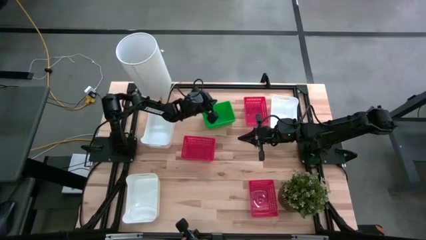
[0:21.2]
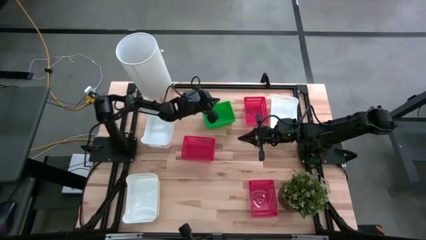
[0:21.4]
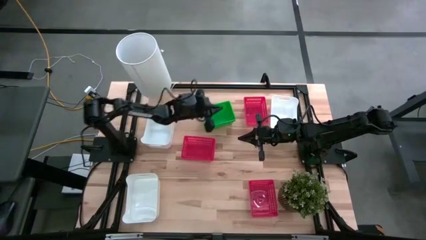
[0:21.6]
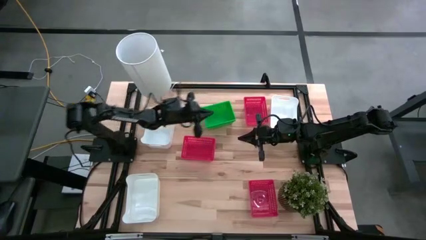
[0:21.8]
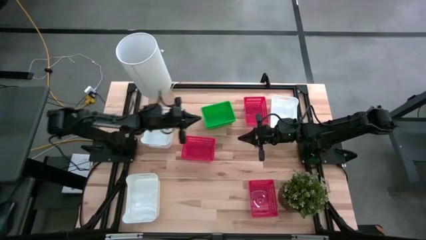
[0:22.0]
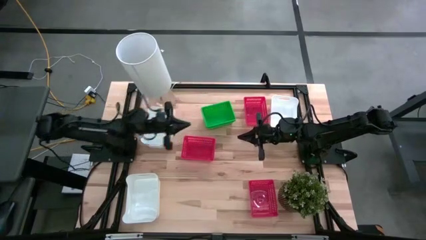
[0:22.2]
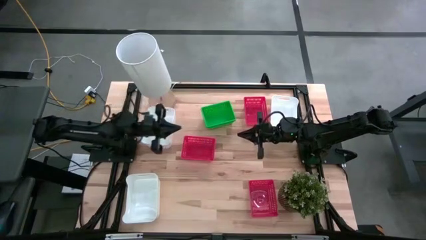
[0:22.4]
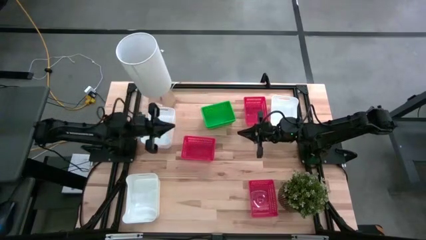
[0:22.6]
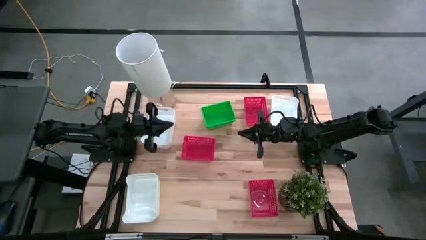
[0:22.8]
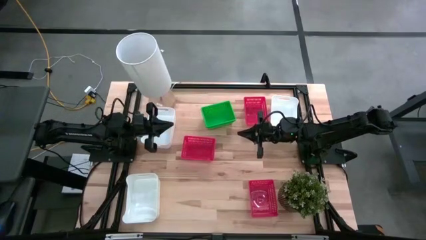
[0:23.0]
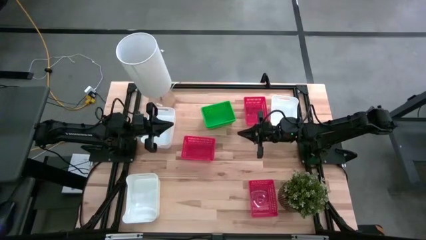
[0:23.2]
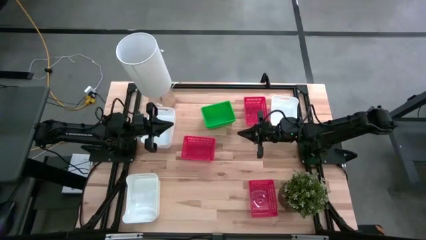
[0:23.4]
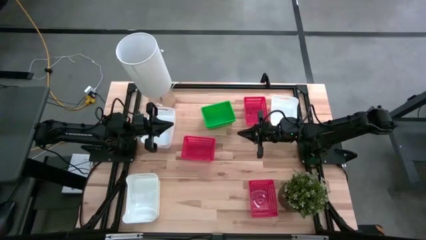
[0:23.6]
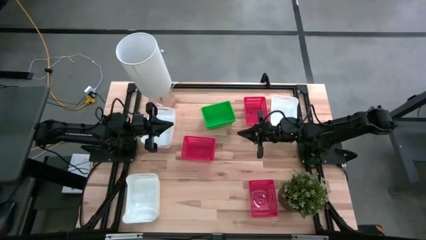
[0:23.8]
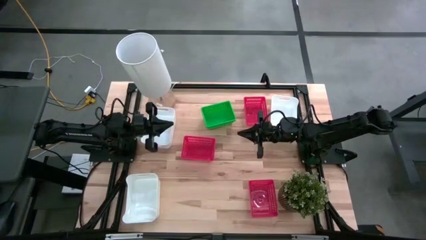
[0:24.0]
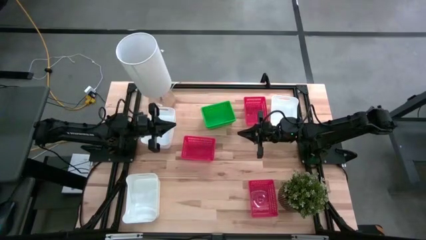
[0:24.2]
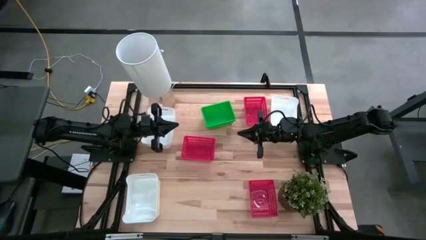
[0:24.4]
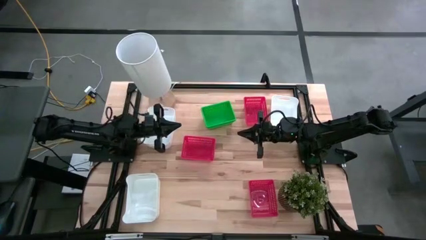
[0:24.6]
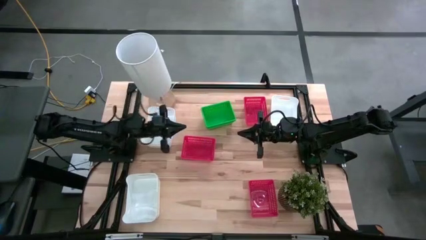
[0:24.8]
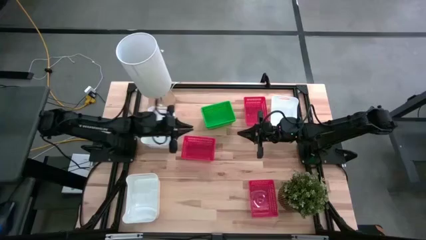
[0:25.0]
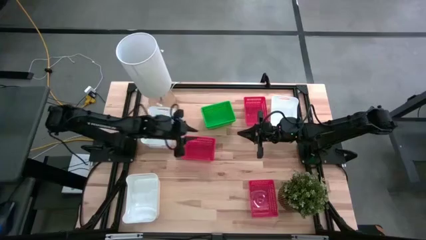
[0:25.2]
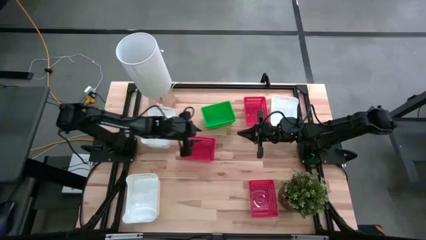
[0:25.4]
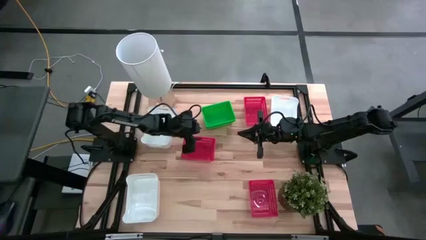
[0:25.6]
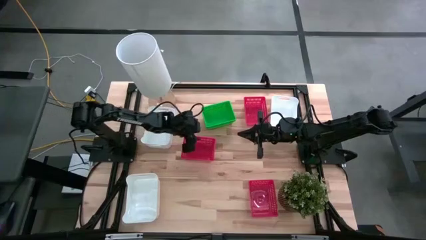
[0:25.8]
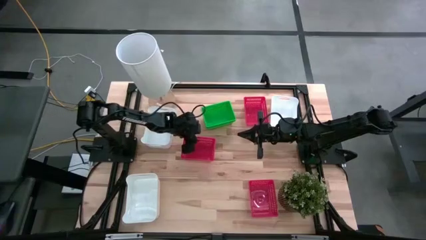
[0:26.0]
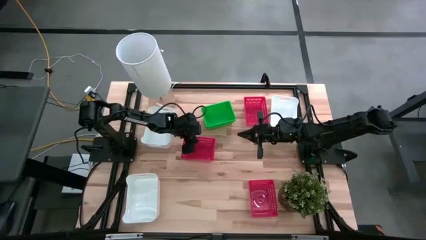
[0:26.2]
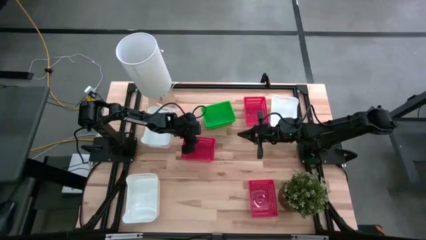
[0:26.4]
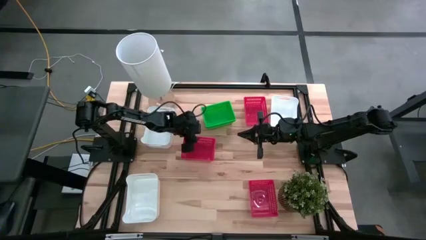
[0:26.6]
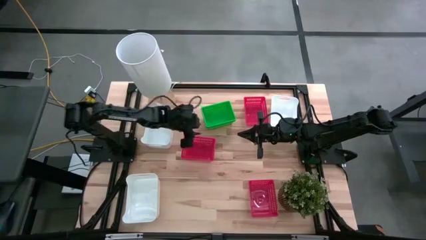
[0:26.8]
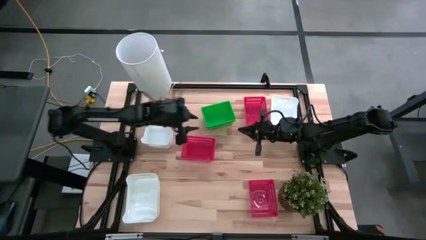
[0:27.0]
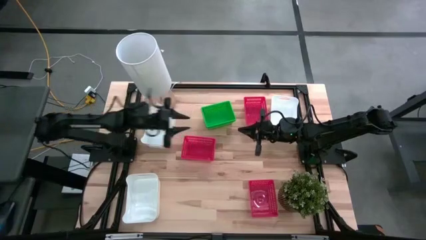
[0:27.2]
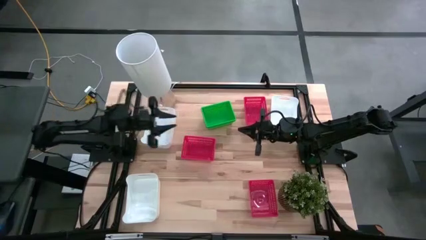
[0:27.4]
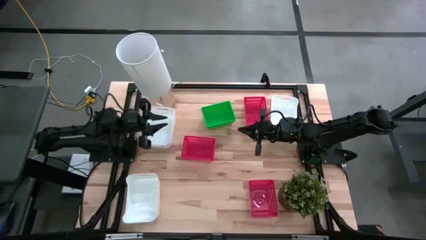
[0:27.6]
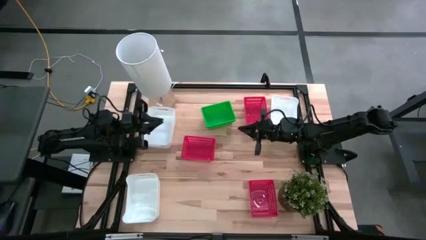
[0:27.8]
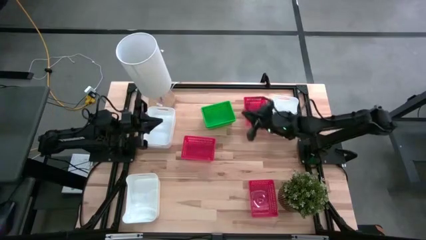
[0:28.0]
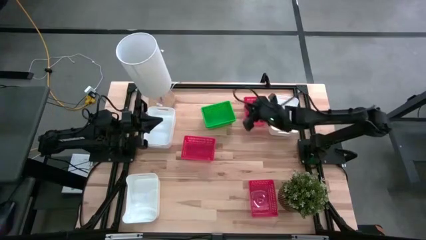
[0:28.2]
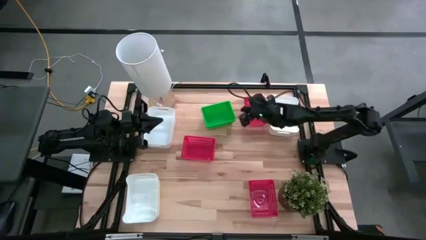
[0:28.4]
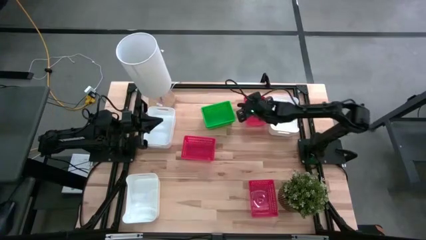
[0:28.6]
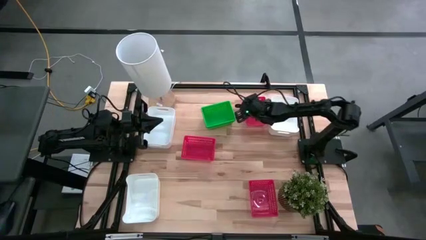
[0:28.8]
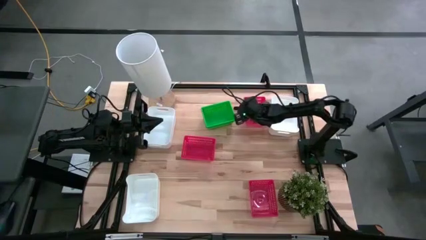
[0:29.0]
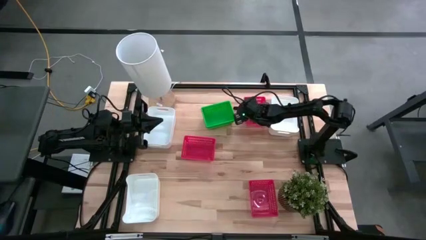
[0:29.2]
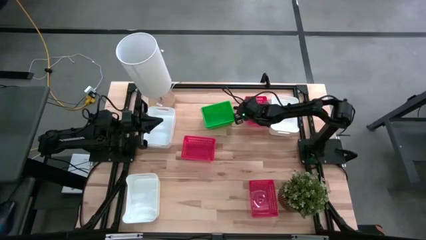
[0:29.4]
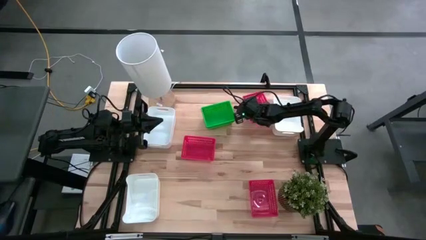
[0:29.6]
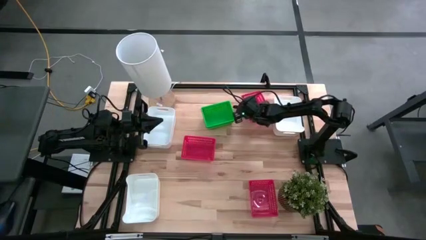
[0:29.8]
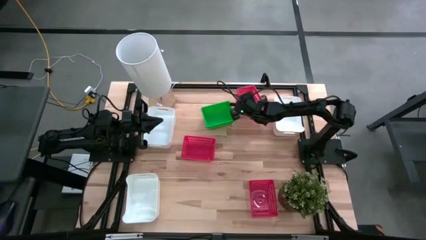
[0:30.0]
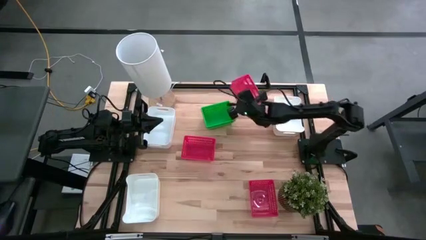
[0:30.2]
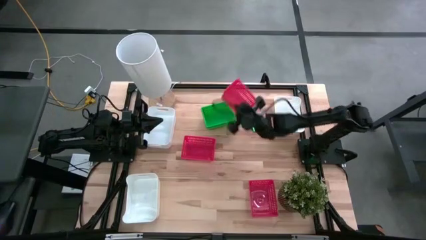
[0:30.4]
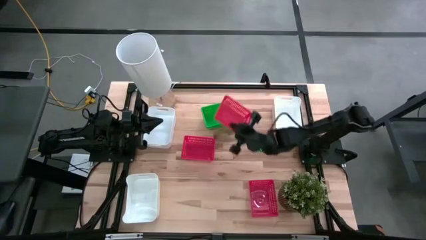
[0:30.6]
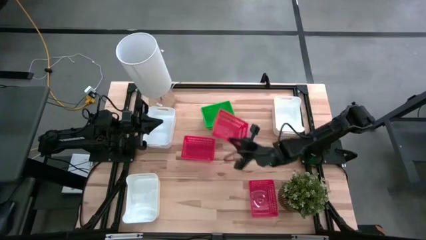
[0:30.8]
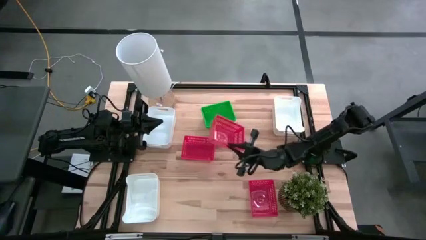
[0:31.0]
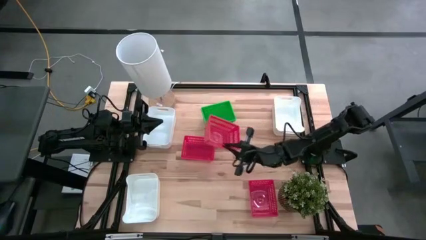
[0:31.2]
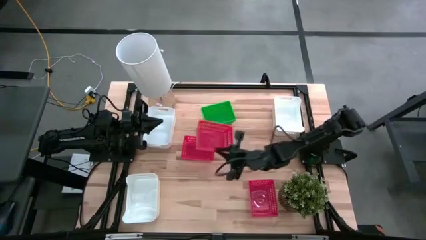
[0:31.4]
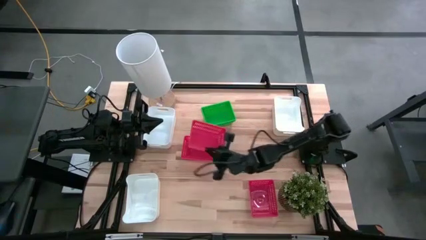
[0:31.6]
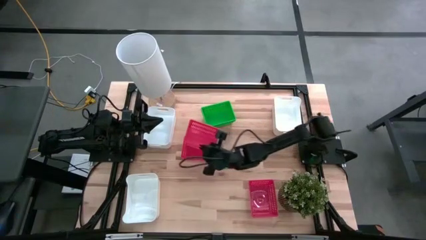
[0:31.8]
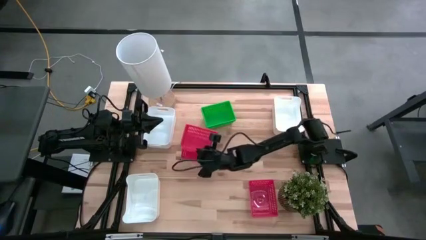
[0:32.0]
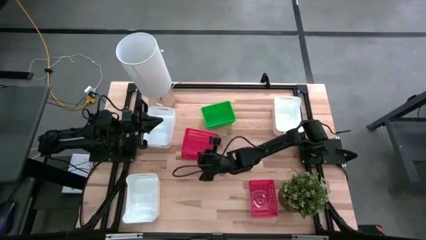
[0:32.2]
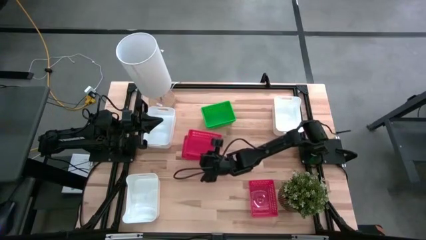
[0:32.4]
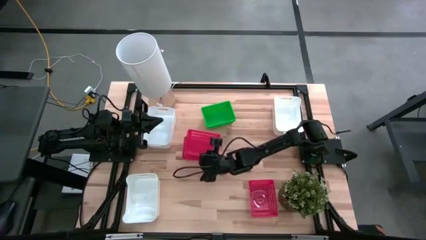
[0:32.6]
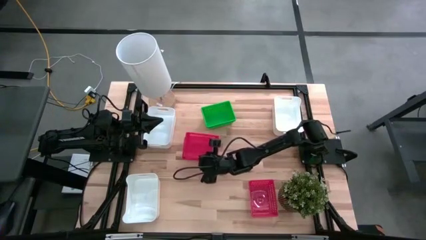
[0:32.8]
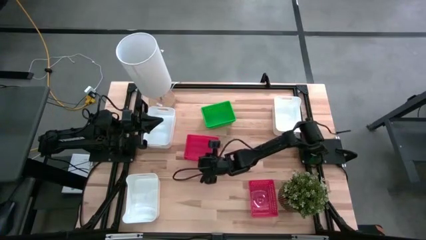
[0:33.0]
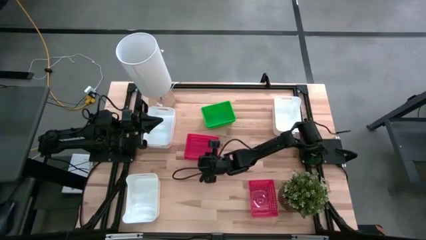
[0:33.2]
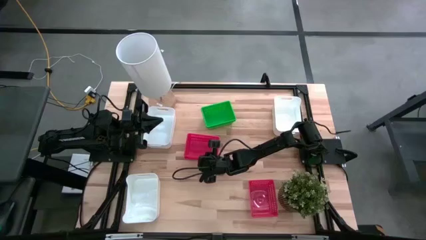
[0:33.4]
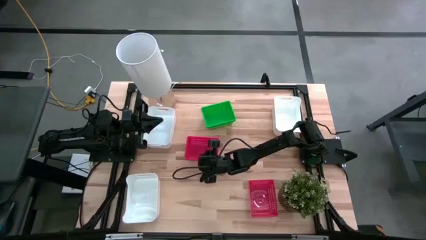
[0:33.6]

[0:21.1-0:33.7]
Stack the top right red bin on the top red bin

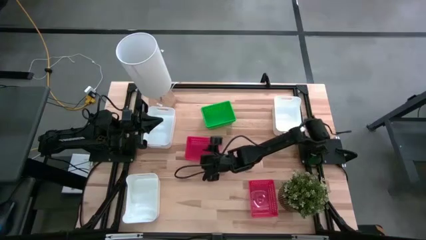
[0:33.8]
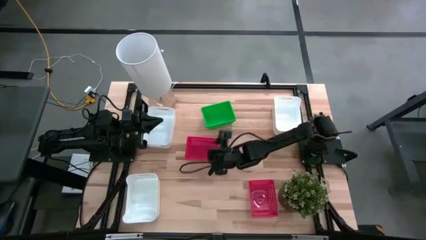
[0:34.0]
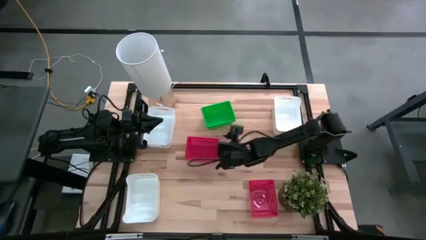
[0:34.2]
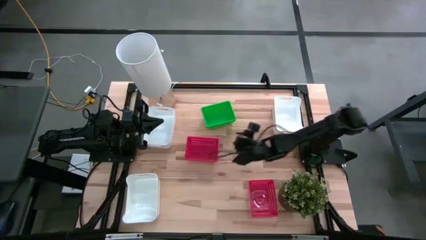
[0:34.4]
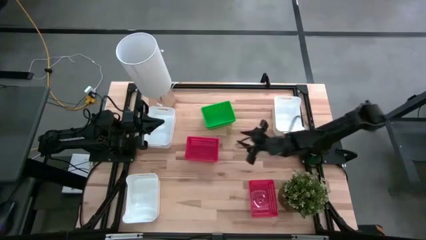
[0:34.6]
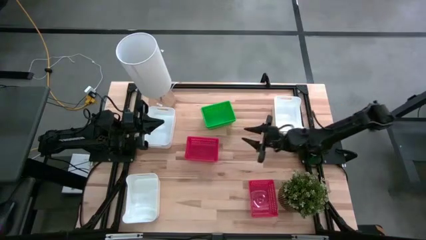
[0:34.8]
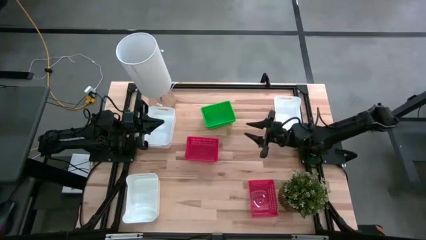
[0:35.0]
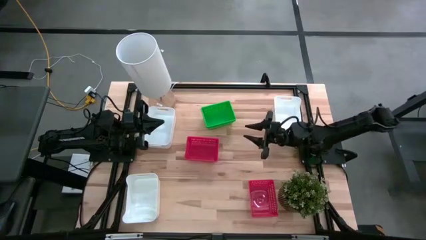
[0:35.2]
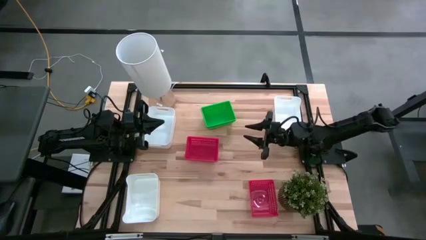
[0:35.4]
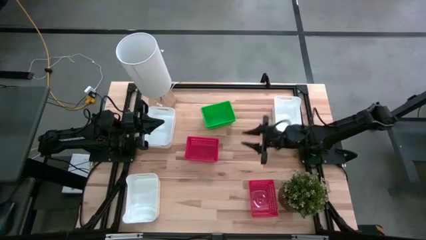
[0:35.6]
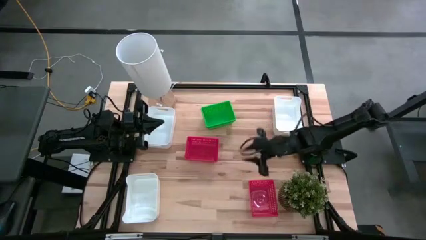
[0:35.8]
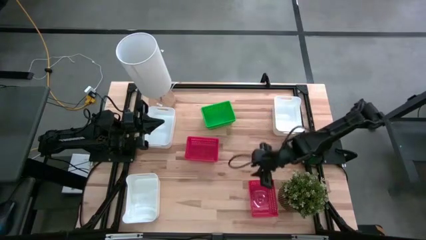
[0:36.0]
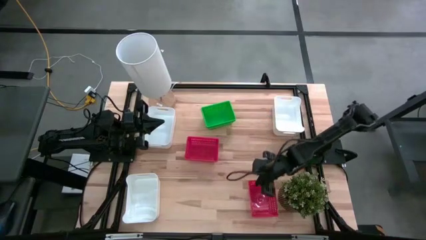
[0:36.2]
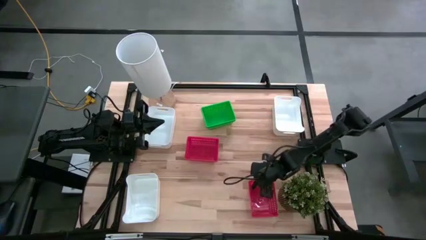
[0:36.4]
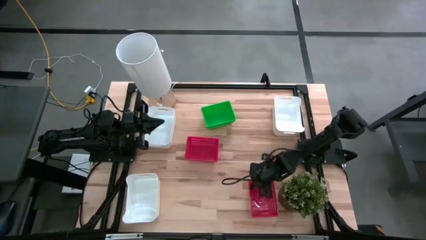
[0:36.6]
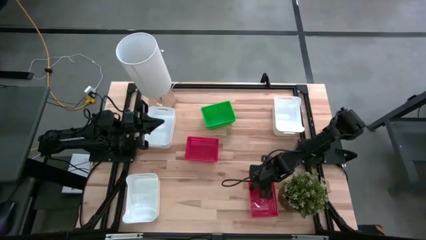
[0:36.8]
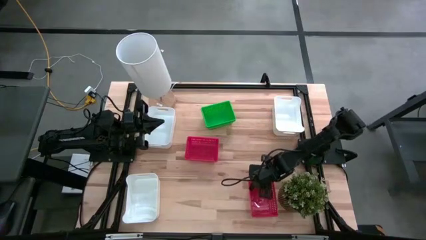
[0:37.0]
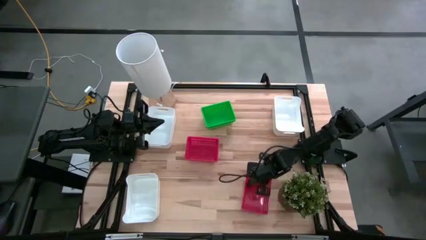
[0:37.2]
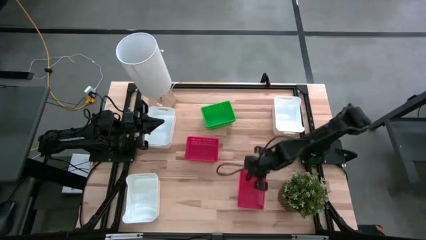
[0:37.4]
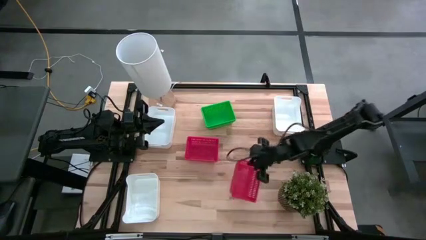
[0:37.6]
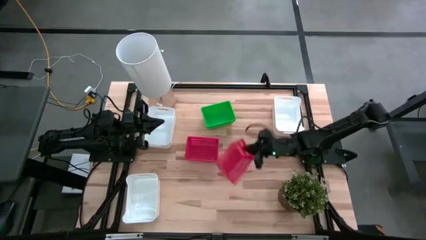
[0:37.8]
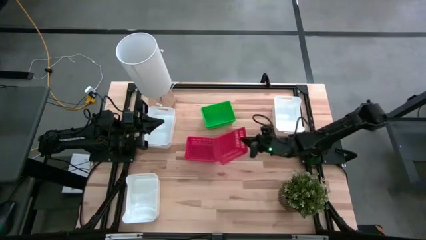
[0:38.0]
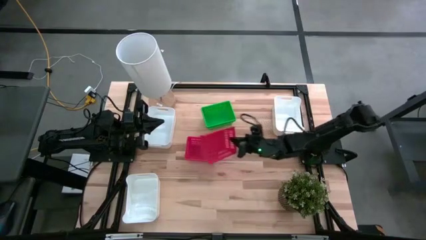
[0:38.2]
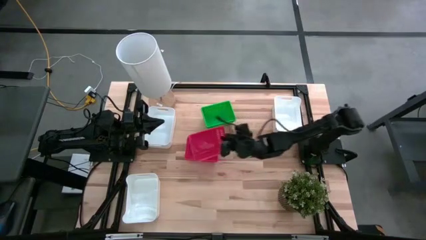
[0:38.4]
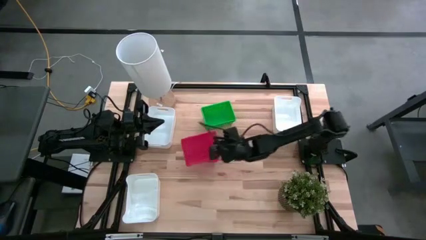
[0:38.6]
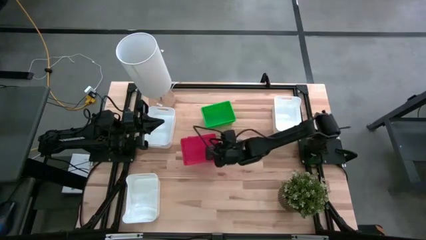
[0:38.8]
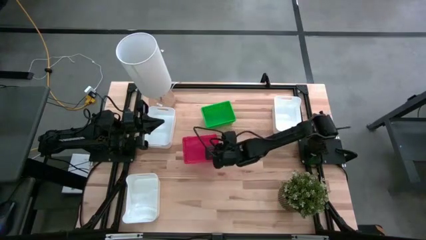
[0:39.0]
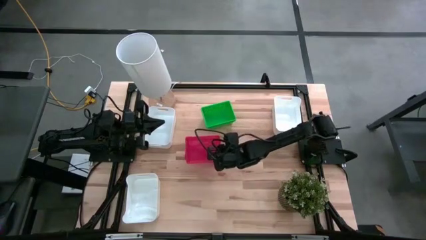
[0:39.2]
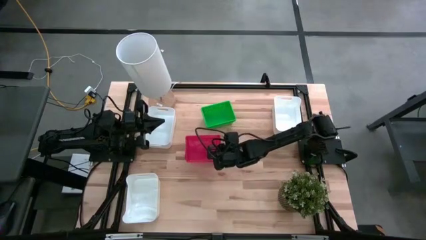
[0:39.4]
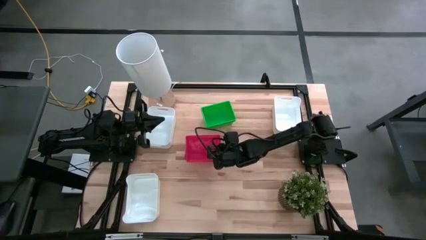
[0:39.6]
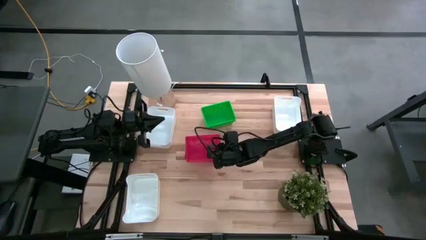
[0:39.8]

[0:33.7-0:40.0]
Stack the bottom red bin on the top red bins
